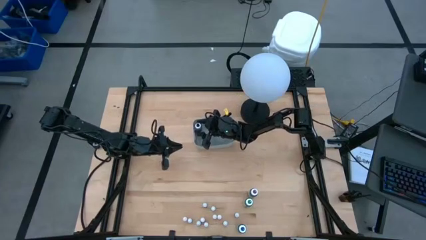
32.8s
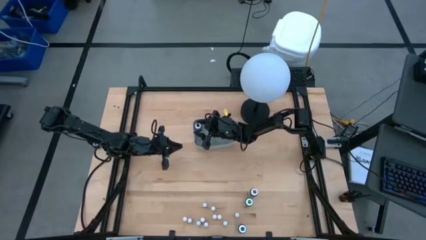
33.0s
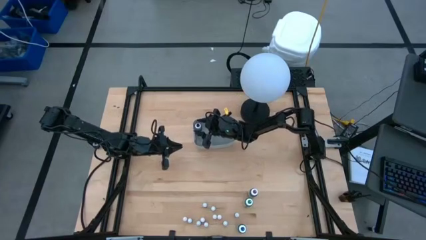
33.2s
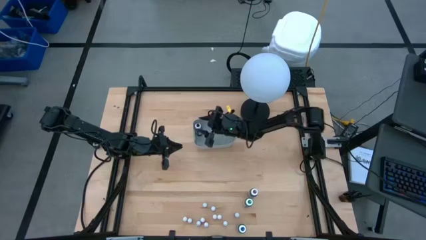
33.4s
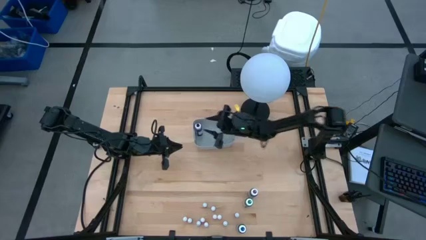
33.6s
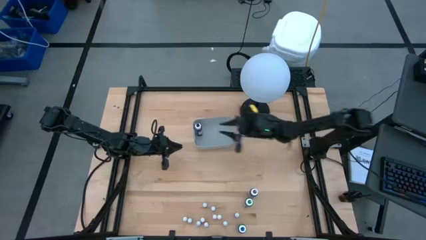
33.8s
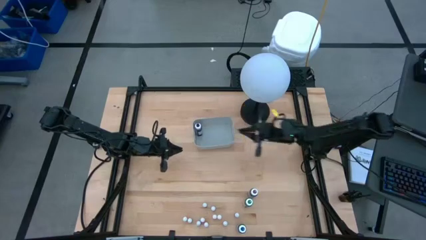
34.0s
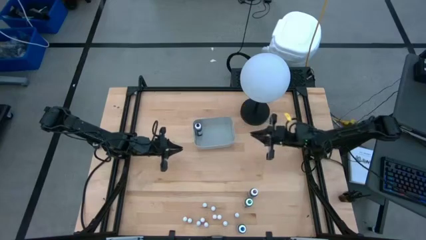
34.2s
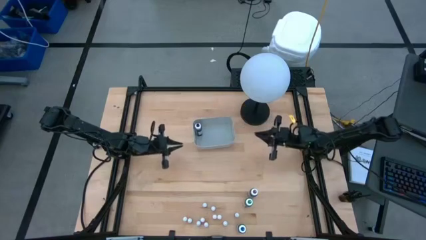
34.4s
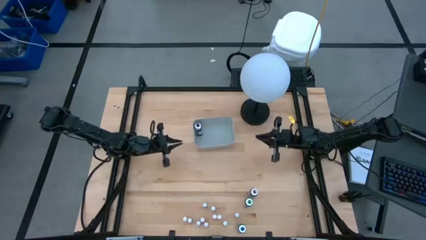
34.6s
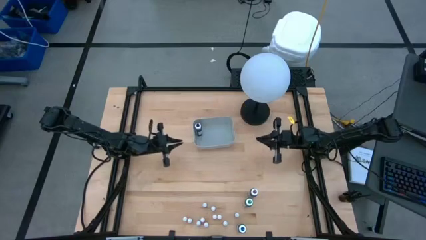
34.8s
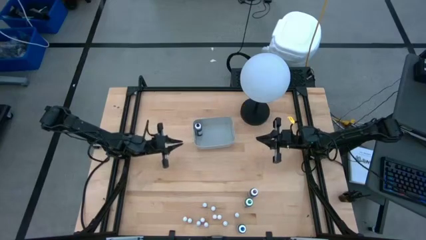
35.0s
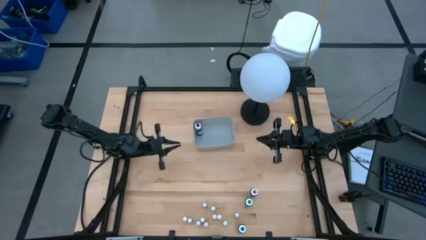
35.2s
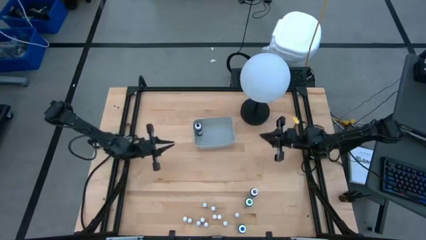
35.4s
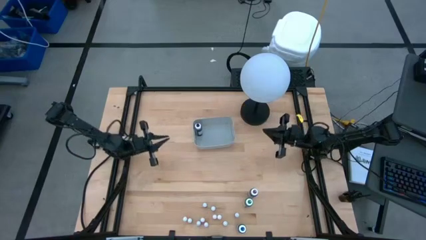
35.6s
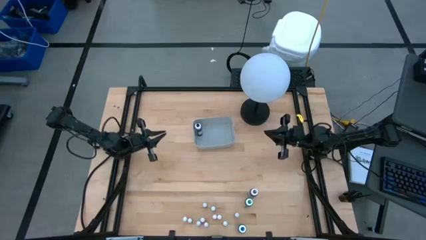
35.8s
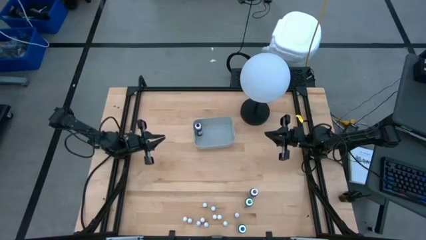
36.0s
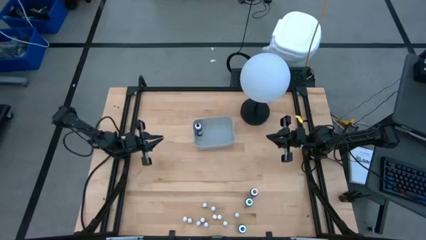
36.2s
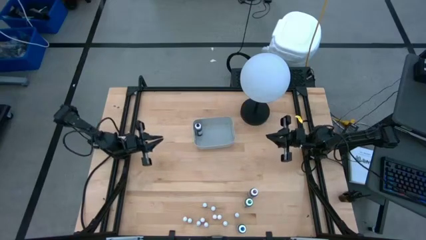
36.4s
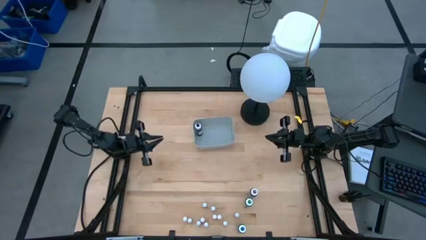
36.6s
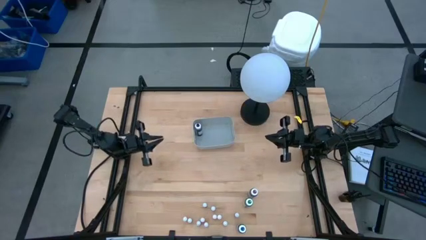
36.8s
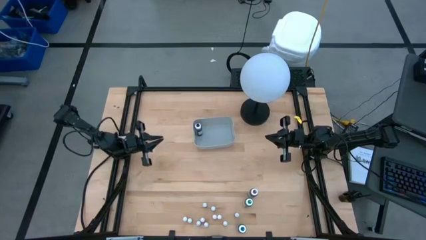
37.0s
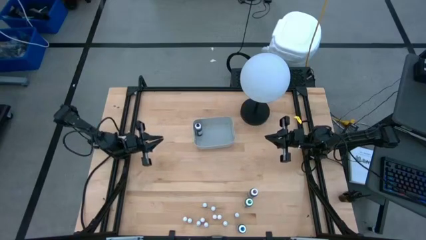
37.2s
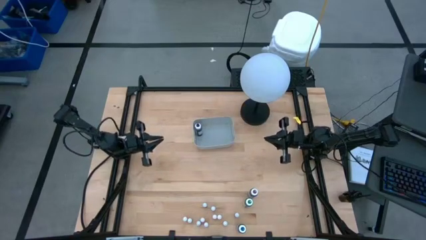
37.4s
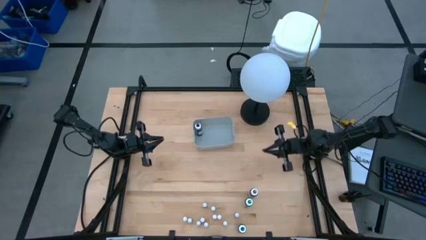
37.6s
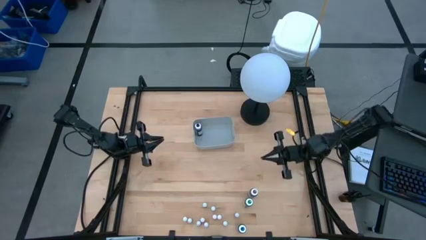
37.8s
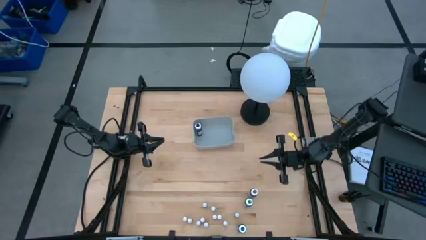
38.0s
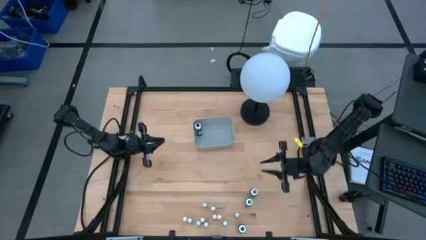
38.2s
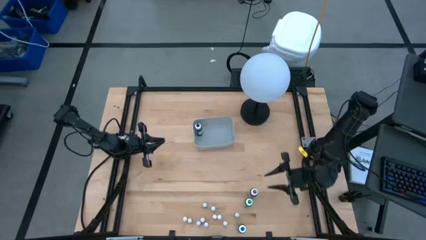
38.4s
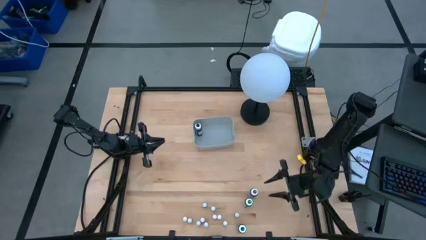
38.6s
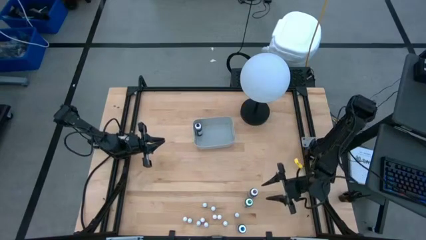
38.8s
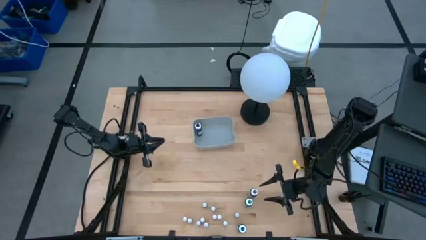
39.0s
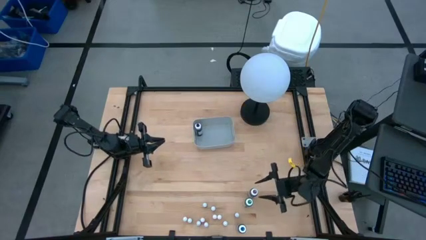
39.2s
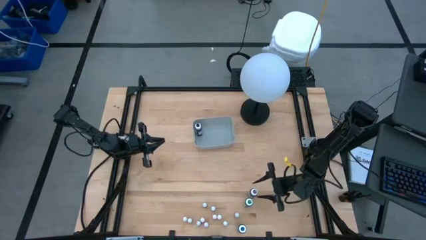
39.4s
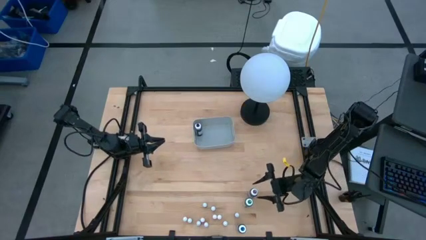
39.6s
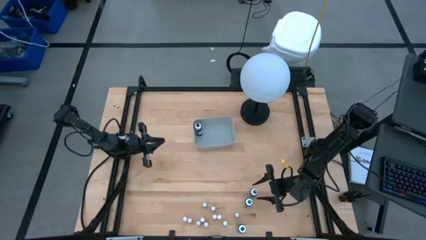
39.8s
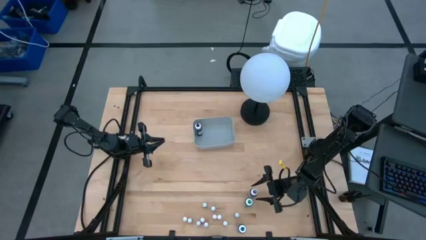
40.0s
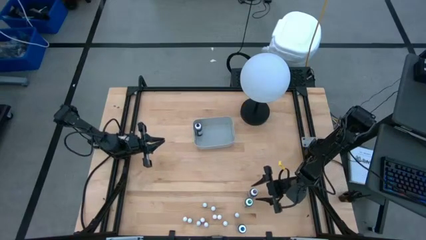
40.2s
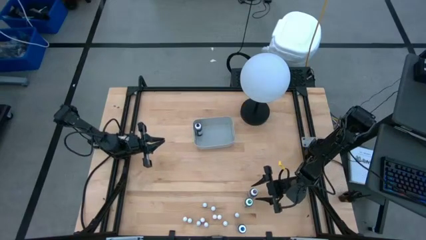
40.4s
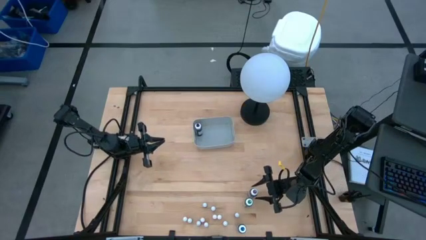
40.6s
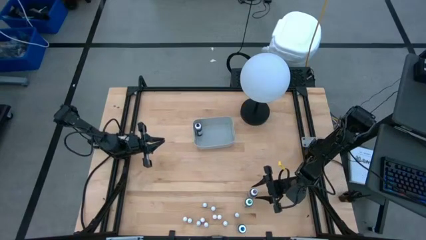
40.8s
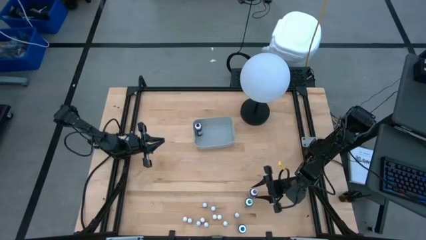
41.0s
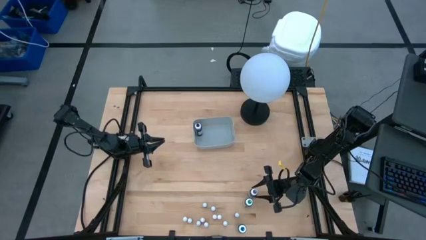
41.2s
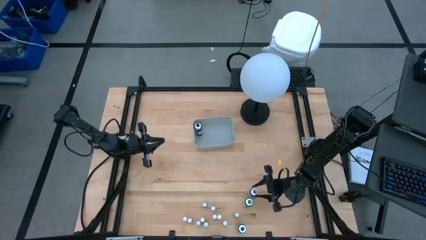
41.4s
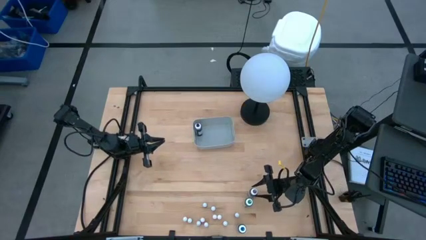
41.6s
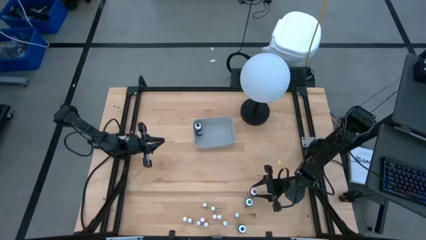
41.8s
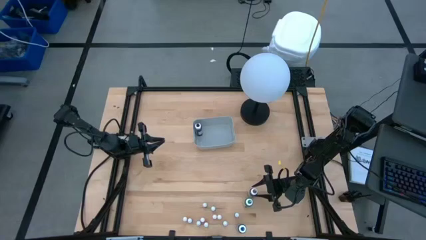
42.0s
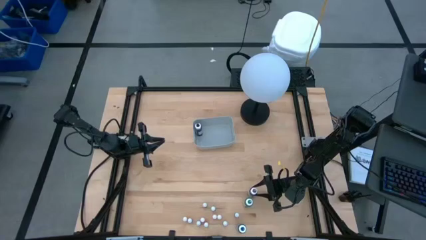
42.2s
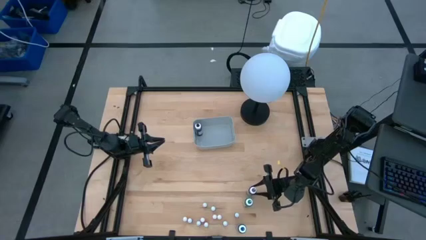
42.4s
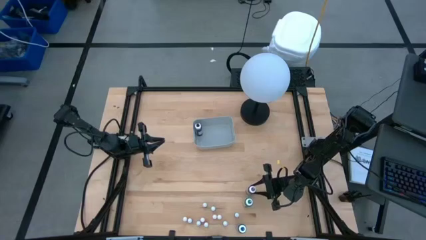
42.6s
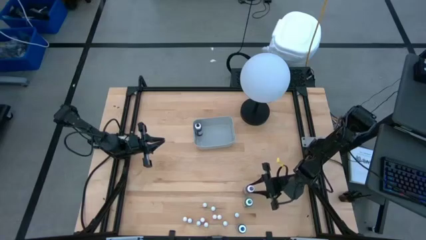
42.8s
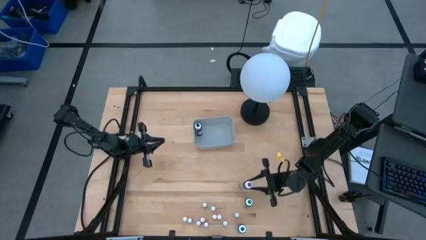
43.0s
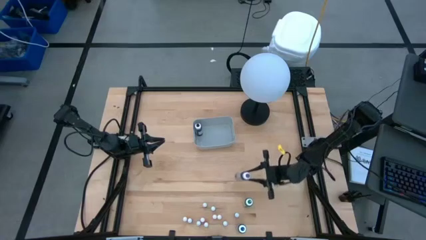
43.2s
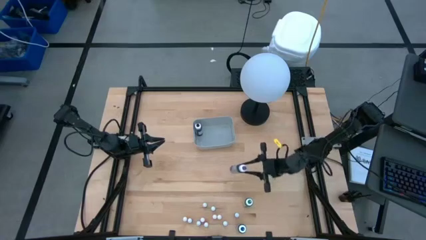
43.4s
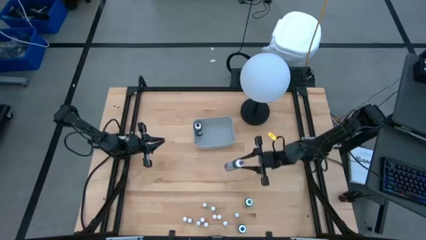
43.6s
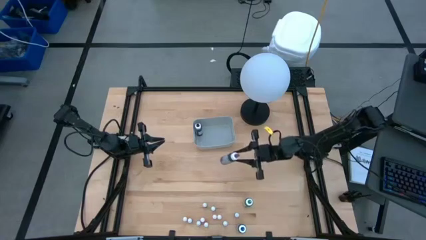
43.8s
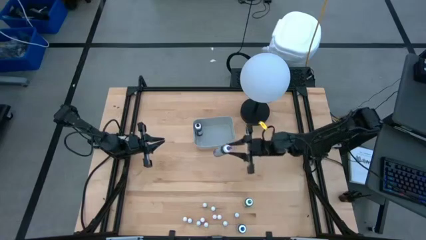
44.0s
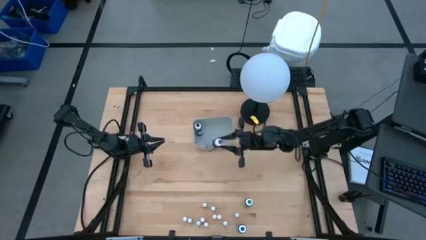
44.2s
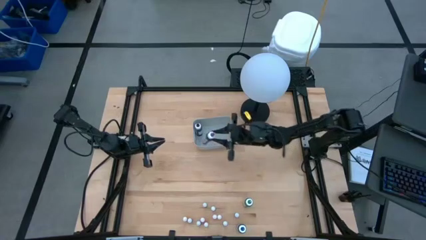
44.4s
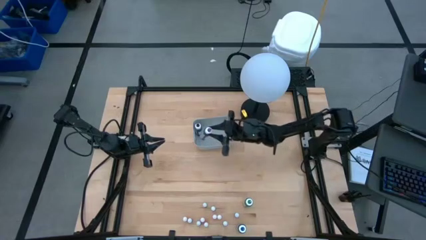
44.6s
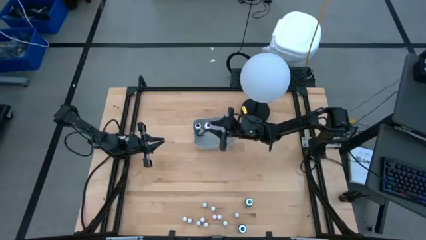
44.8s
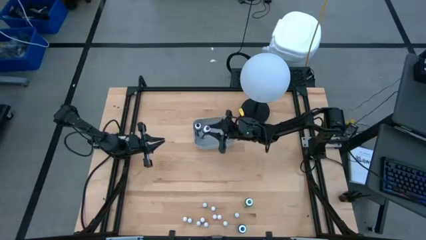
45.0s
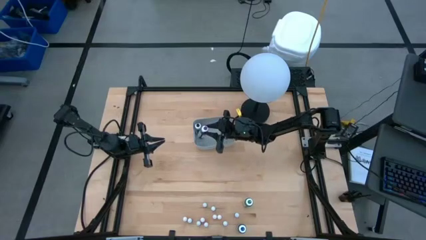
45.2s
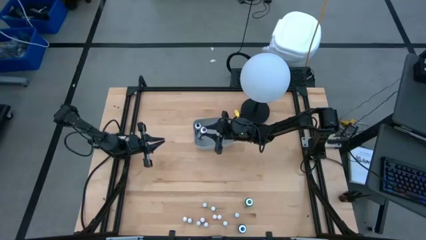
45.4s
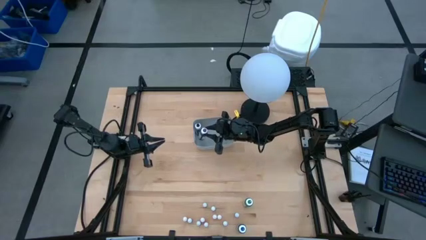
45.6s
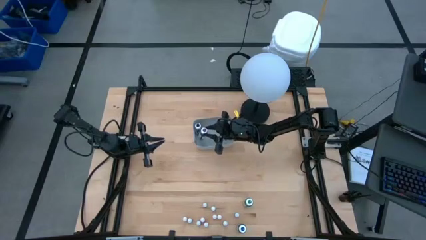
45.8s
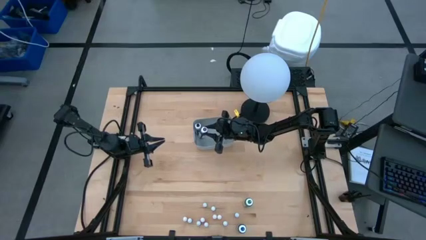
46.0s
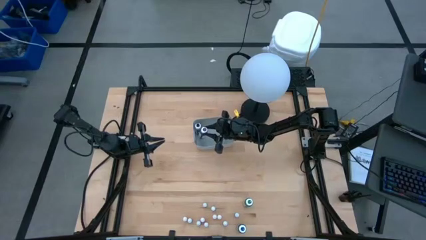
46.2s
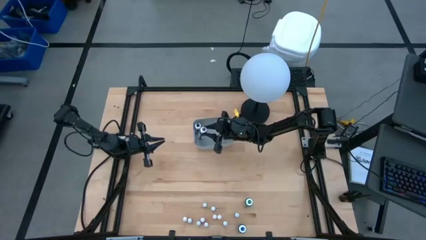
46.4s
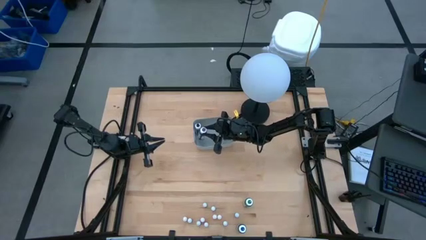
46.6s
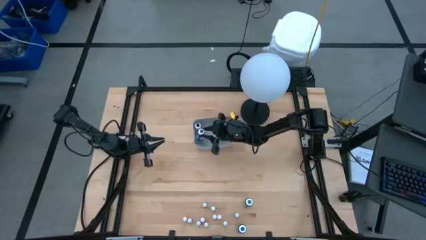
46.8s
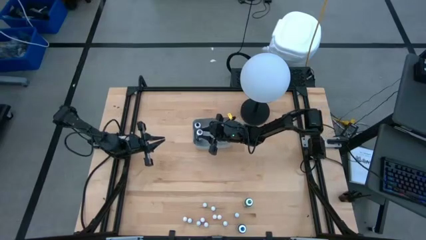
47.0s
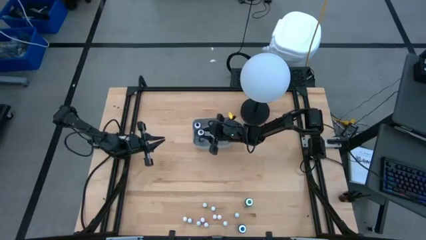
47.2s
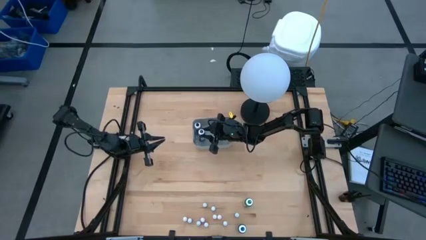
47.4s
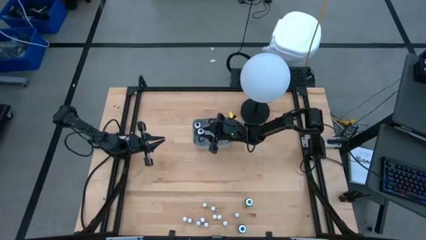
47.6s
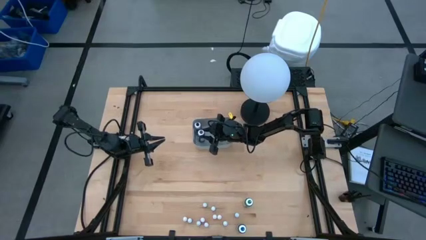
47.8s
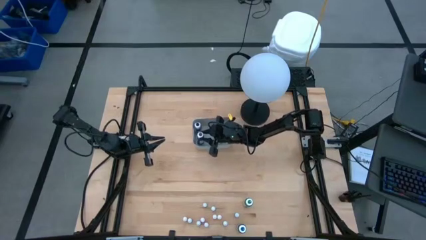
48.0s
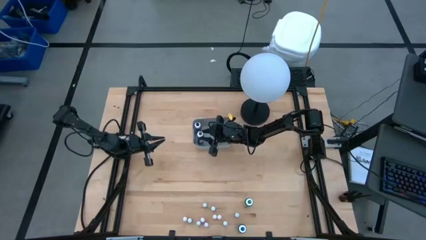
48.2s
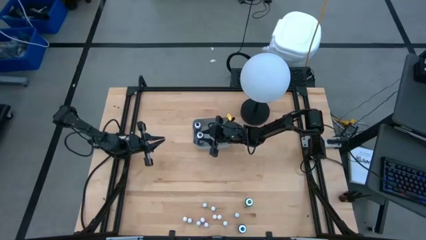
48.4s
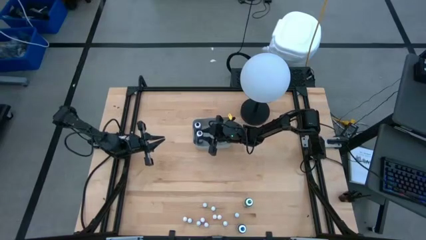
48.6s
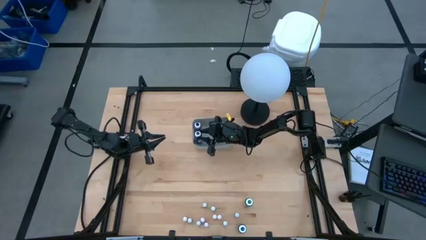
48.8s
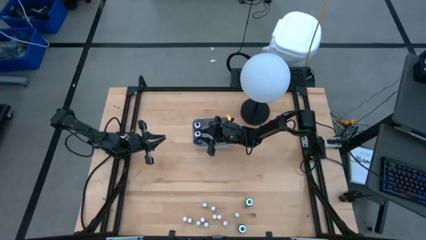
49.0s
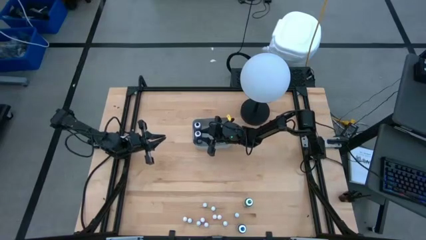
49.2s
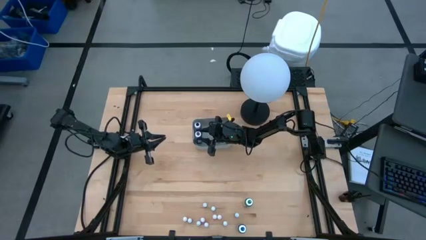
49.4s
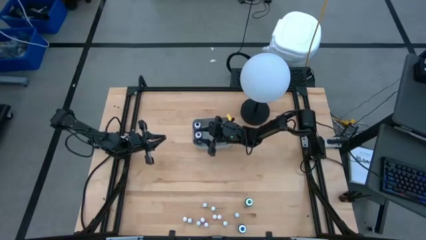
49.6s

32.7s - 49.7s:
Task: Pick & Place food coloring
Put the large violet food coloring bottle into the gray bin
